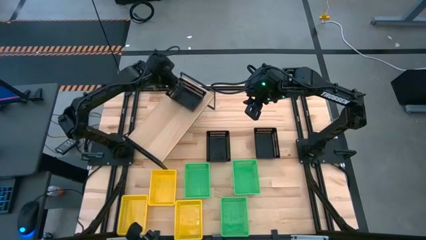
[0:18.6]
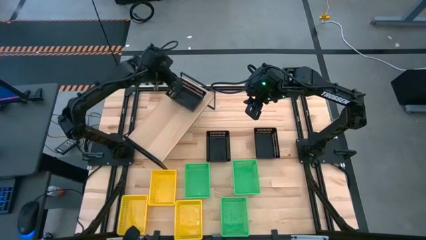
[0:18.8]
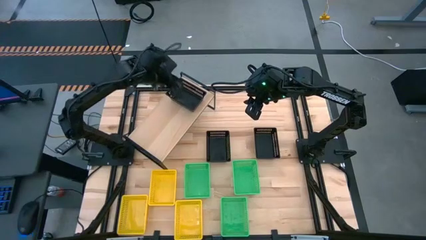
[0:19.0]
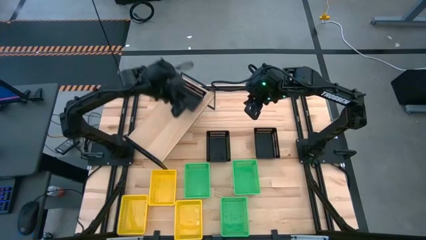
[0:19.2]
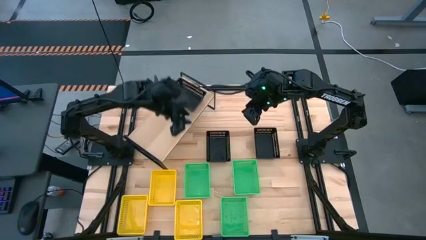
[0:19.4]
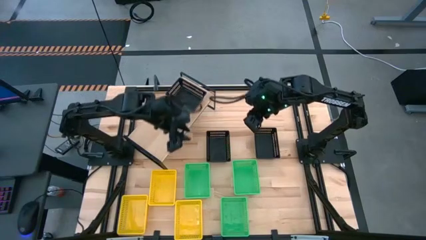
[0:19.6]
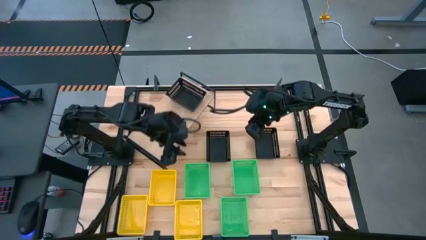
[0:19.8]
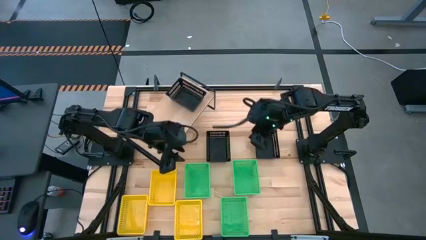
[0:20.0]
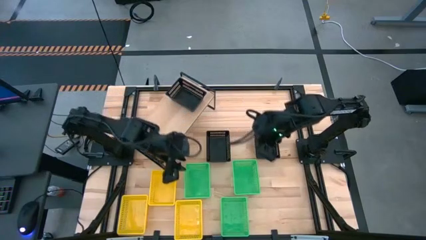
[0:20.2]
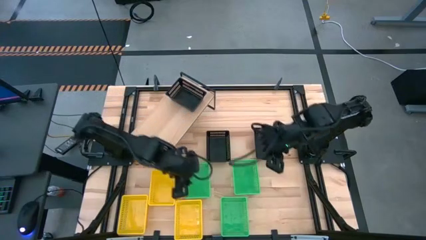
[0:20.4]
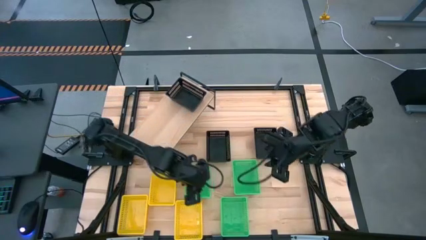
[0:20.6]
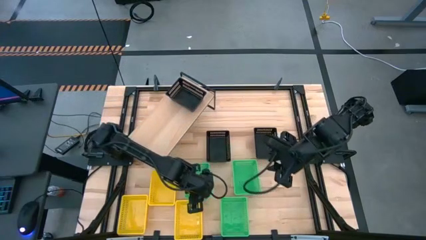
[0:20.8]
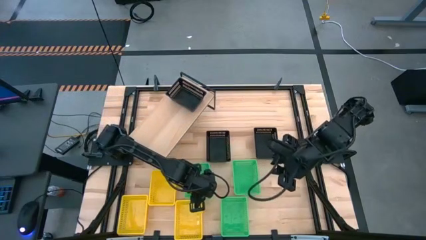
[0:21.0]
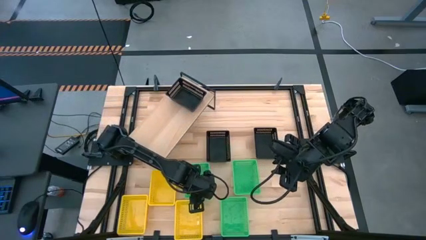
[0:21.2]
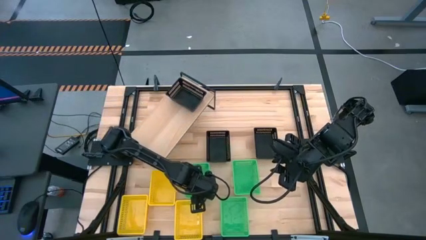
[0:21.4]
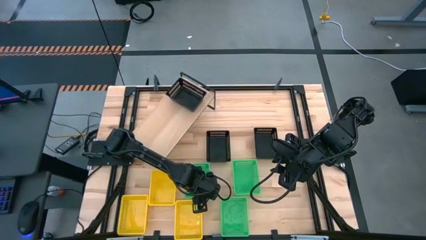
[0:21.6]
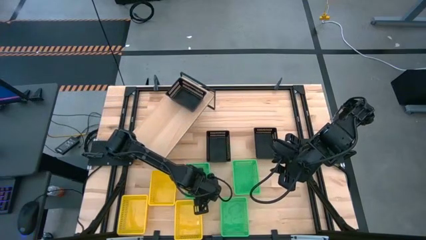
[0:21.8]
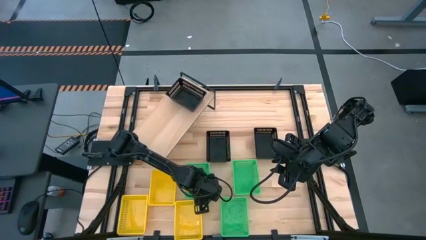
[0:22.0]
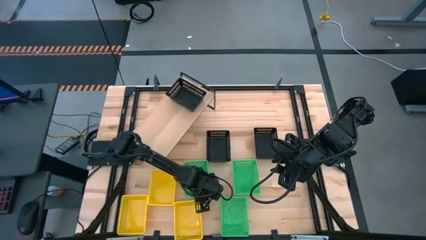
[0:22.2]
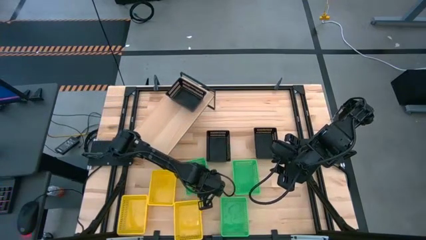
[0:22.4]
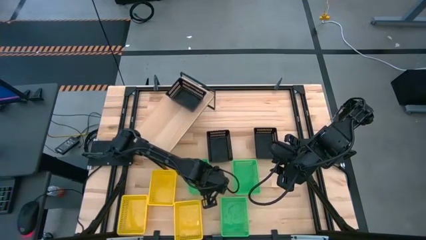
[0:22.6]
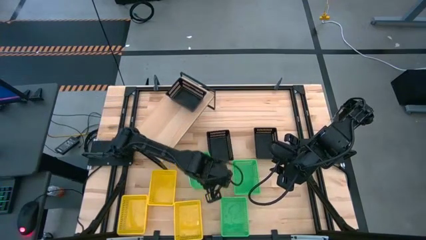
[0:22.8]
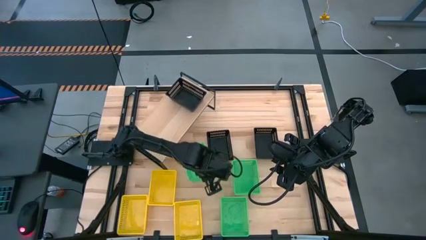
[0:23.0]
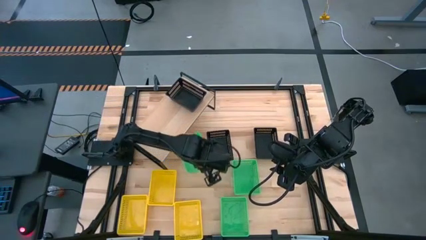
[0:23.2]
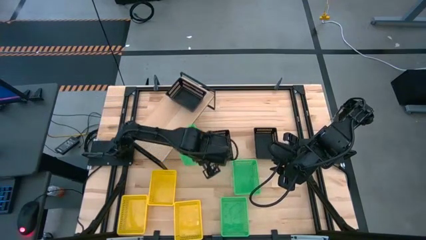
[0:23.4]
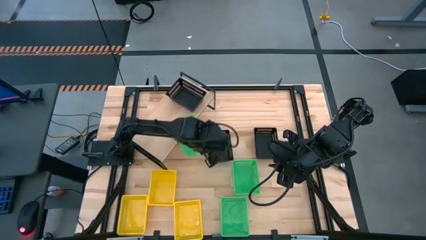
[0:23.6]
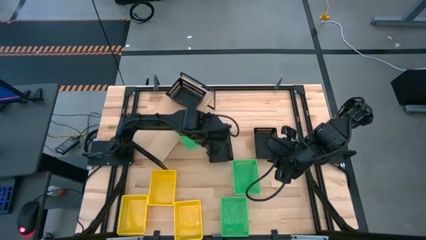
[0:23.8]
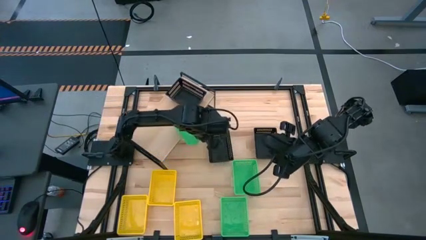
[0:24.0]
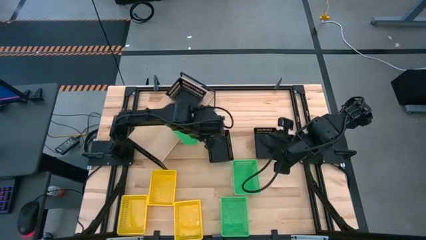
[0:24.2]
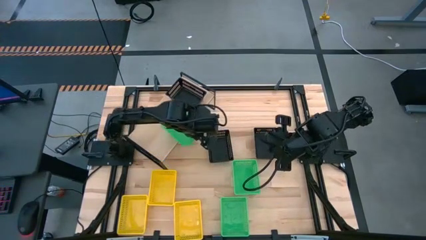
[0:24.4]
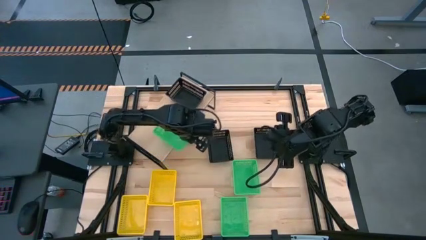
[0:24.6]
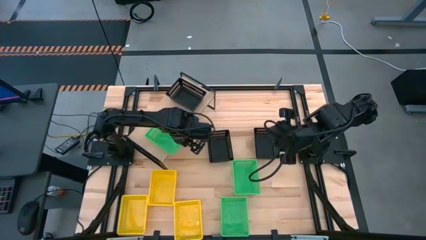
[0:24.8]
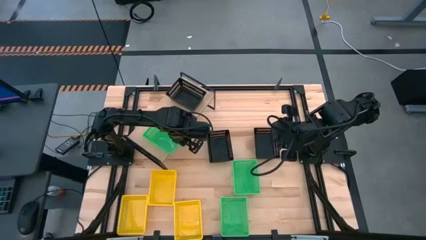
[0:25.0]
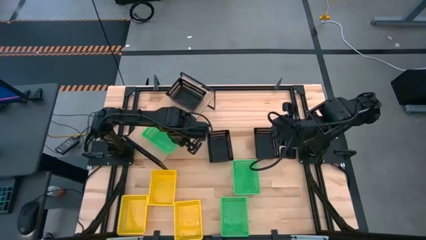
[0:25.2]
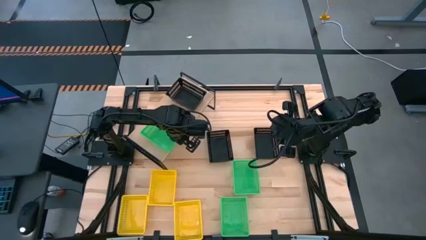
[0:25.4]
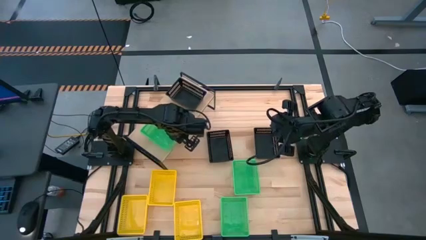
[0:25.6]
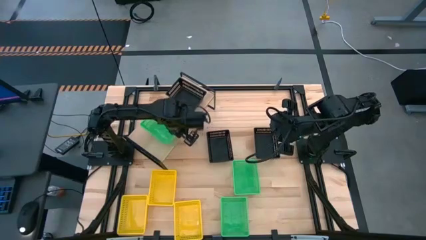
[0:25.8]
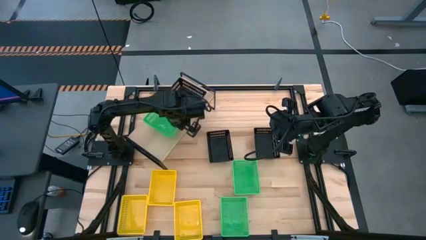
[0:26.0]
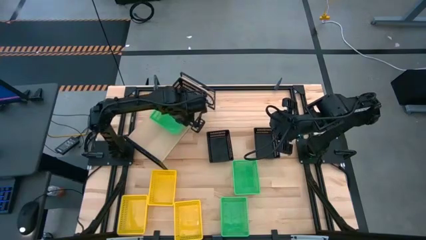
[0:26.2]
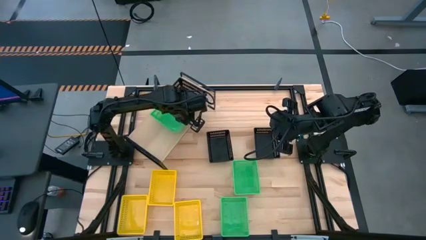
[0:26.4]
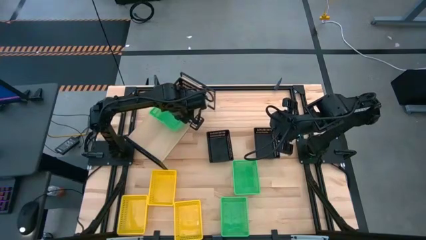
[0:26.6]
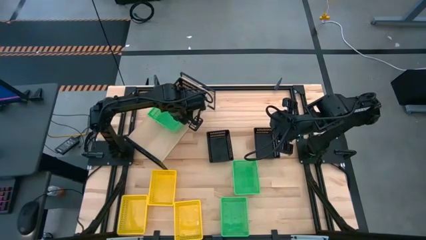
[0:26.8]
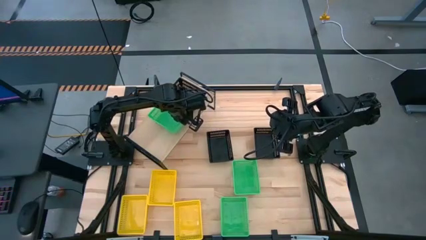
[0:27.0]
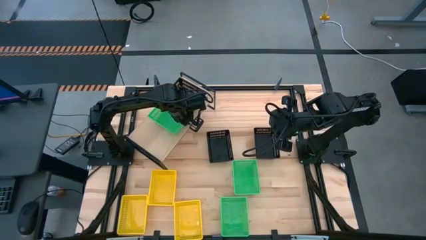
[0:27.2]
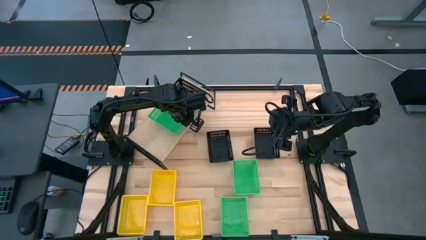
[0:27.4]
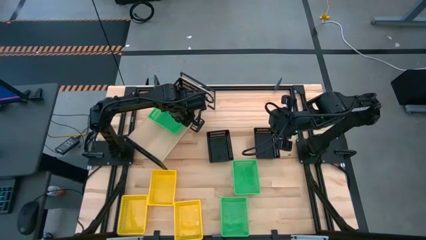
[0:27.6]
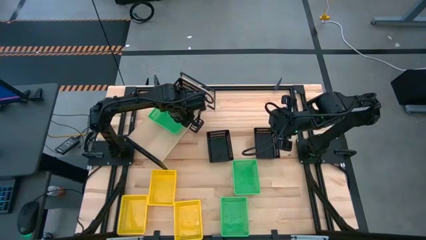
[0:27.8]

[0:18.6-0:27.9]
Task: Stack baskets on shelf by color
Put the top left green bin on the shelf

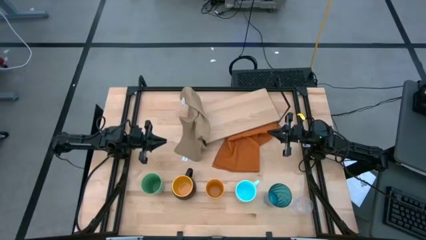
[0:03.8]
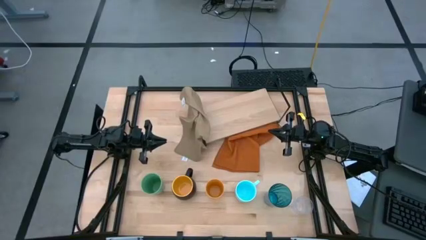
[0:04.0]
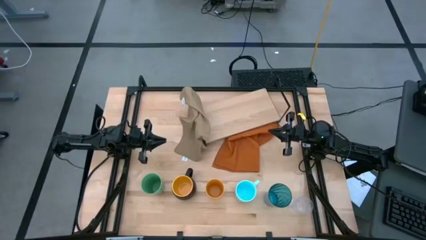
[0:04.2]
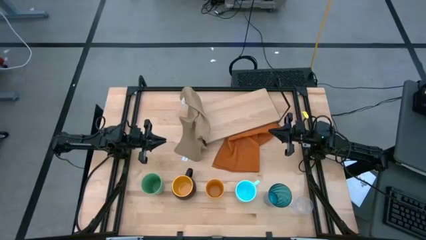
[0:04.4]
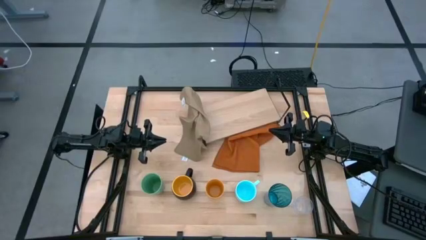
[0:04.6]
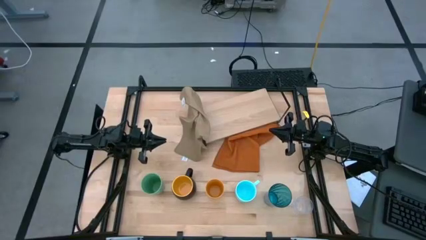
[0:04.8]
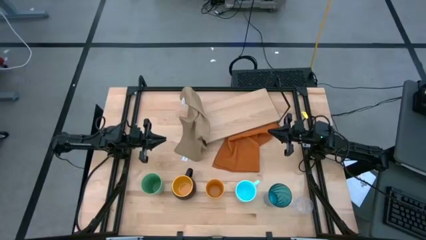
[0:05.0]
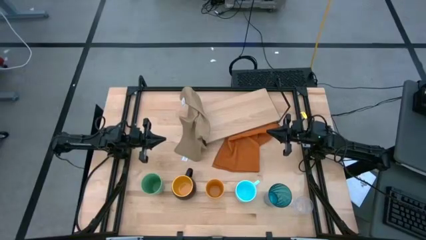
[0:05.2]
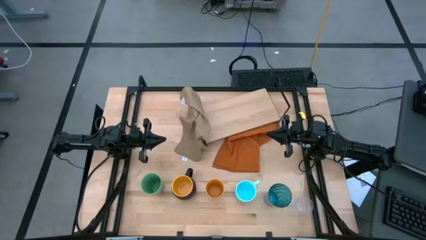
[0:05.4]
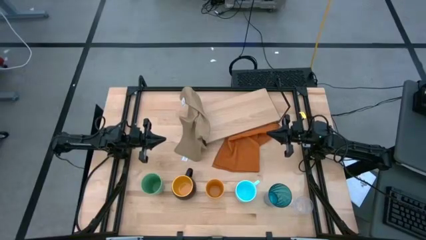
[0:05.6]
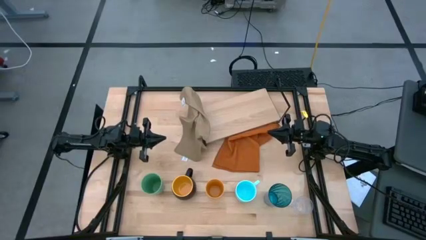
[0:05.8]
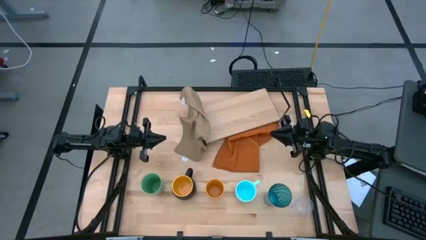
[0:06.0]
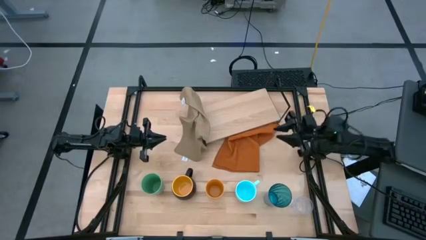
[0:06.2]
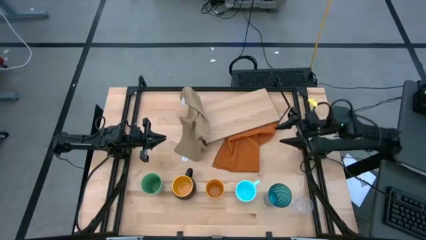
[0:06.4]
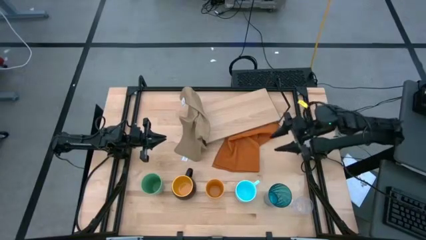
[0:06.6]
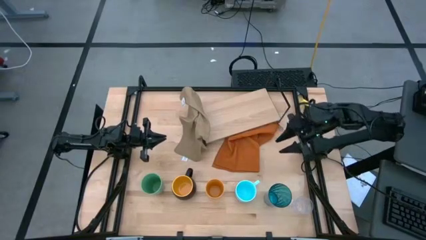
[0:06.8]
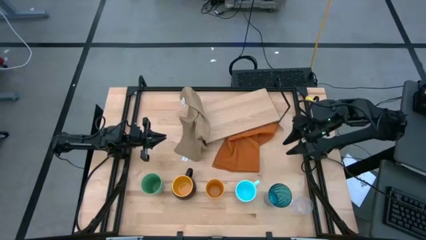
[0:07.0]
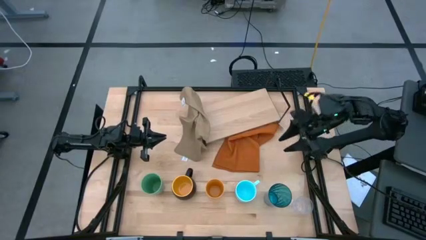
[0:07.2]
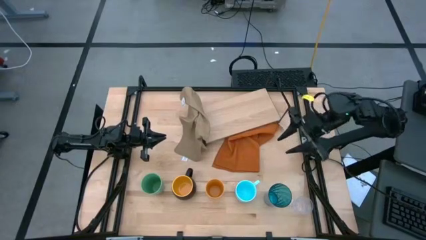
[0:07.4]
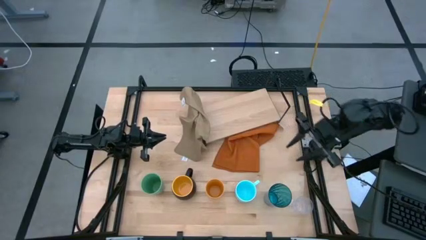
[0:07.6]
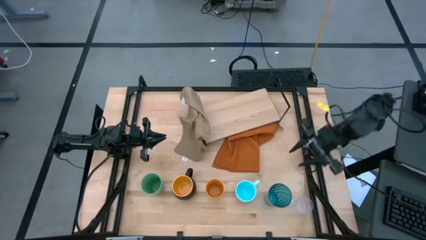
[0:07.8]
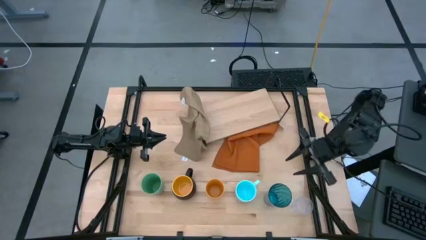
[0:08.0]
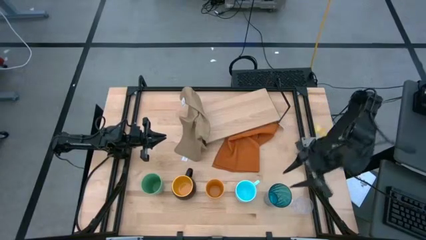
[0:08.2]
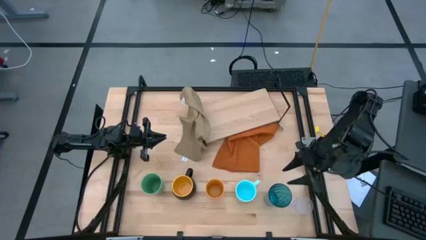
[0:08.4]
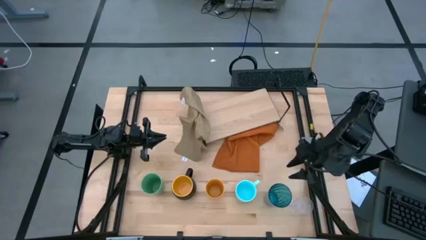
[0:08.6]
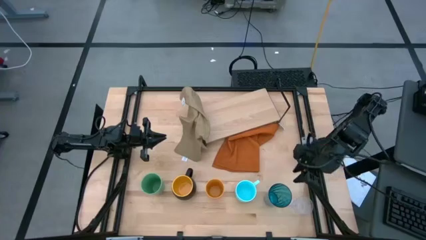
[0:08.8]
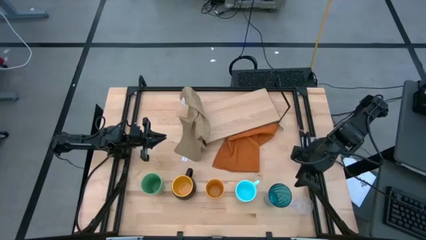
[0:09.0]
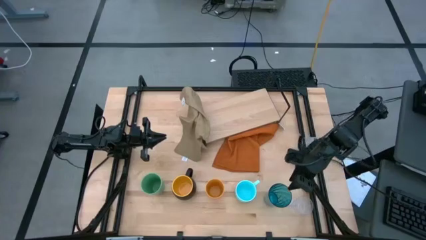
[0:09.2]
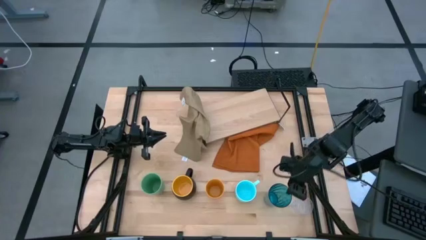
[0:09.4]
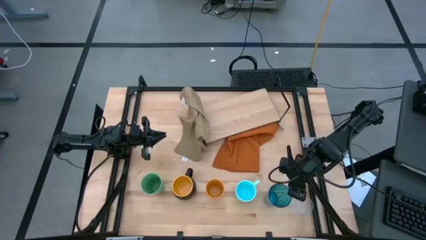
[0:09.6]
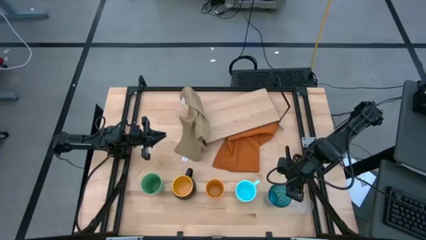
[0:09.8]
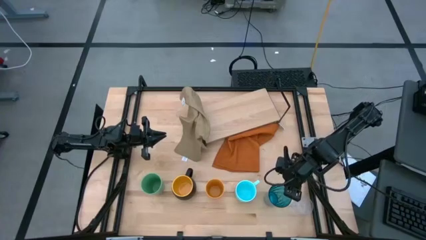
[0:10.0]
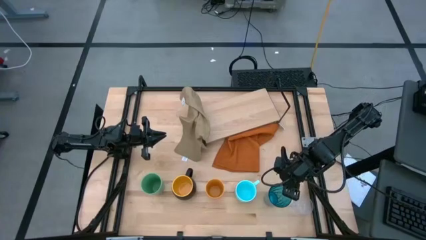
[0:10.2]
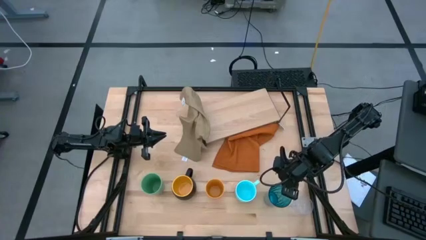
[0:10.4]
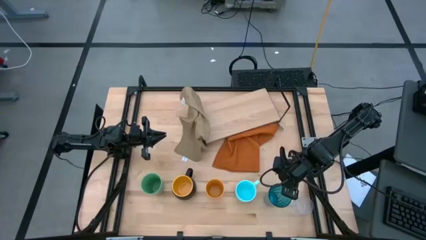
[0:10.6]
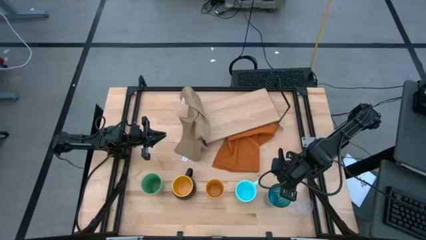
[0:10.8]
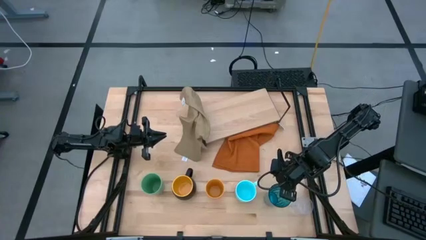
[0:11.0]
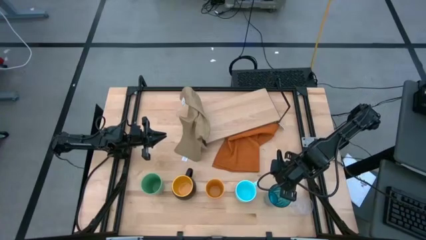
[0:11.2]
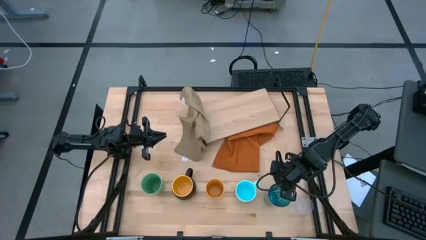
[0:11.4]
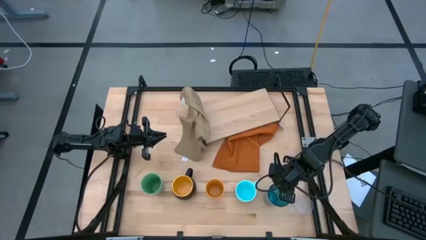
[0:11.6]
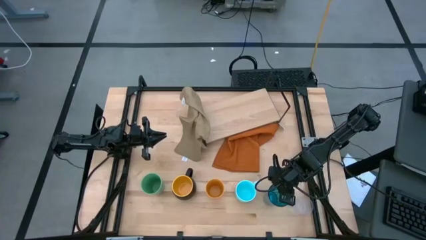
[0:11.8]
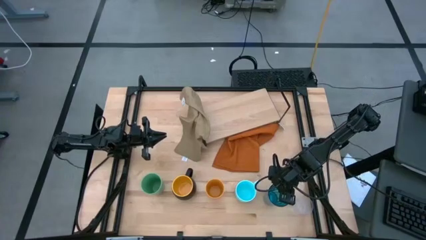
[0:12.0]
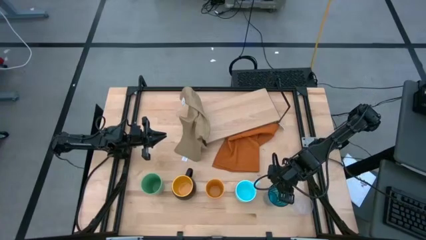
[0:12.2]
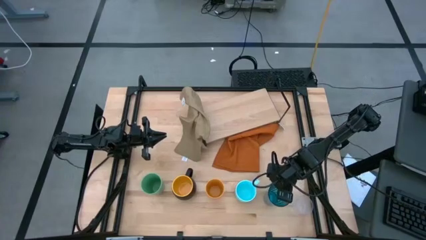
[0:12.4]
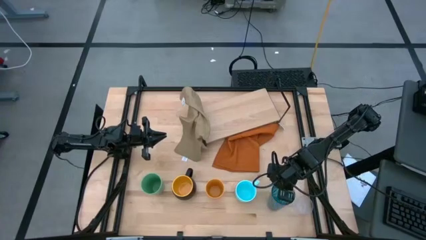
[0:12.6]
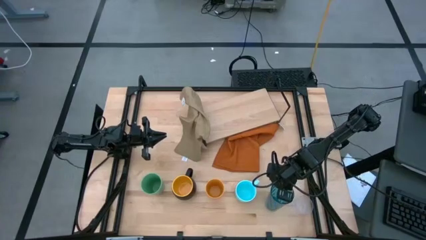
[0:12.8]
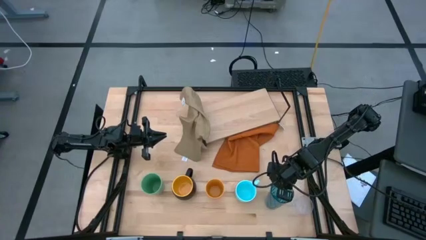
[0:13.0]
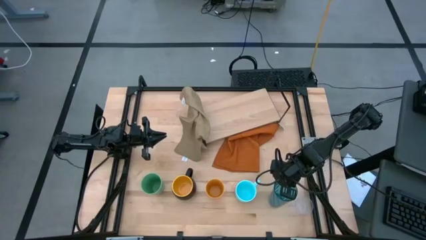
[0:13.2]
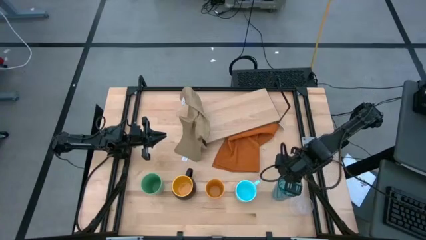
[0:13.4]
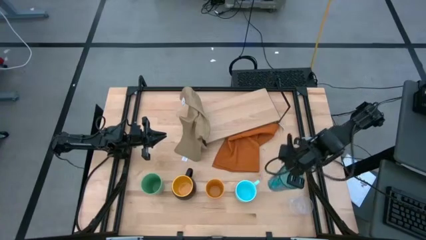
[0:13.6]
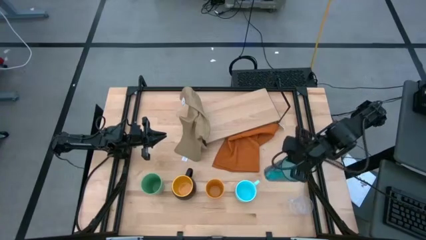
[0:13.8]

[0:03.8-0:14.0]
Task: Stack small to large cups/mugs on shelf
Put the blue cup on the shelf
